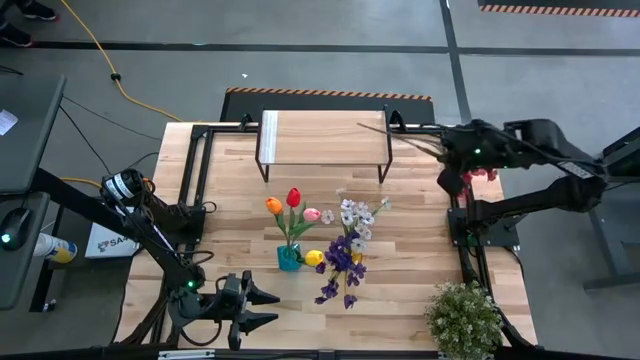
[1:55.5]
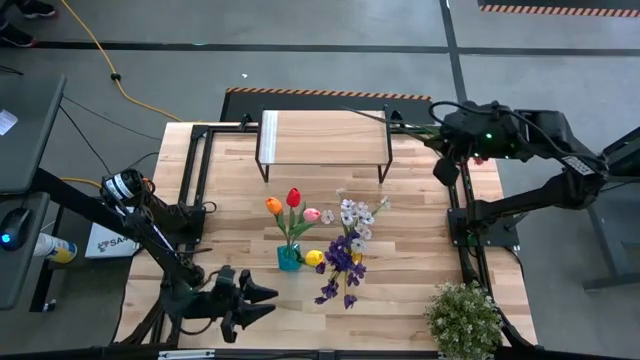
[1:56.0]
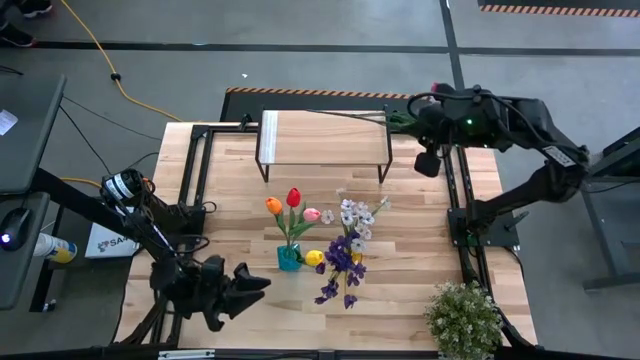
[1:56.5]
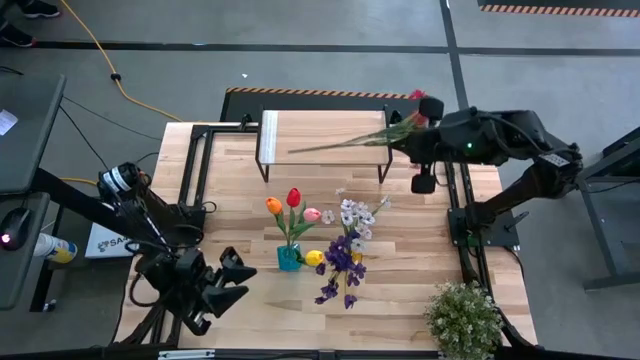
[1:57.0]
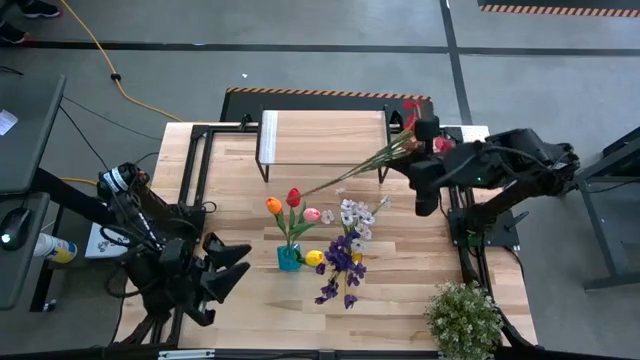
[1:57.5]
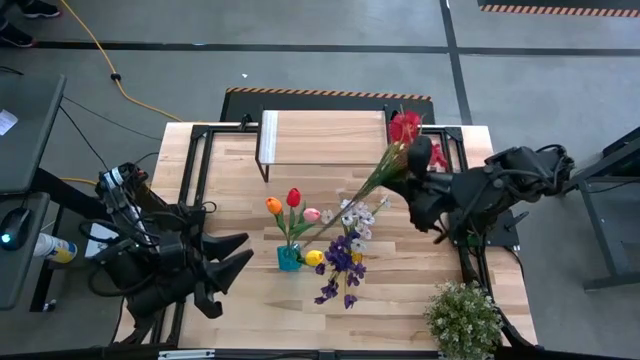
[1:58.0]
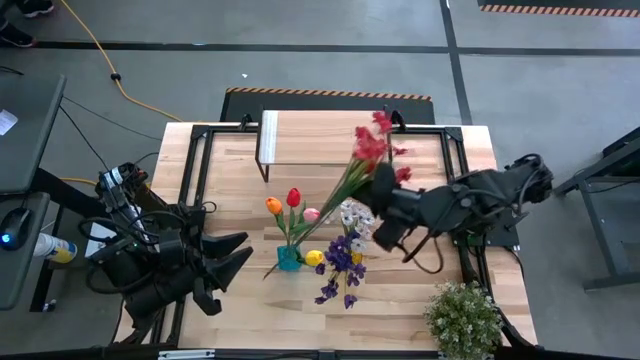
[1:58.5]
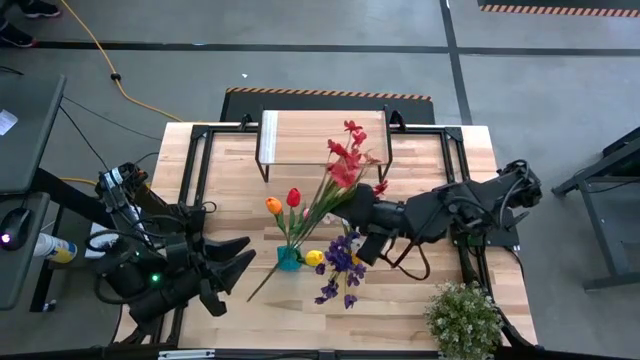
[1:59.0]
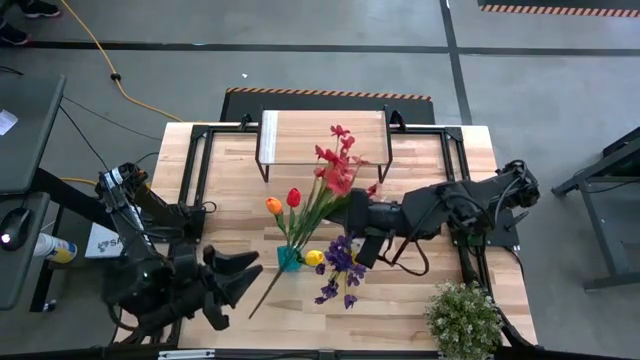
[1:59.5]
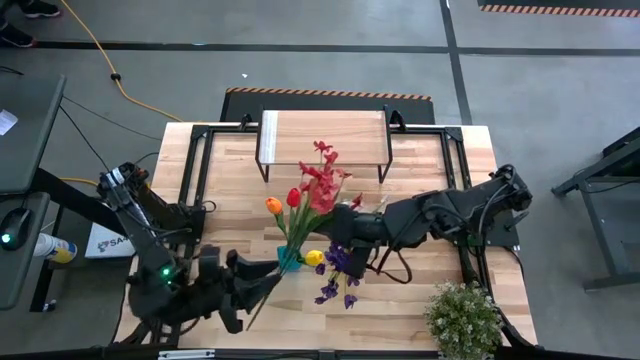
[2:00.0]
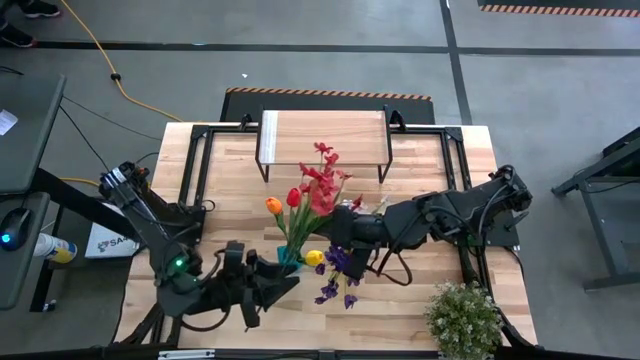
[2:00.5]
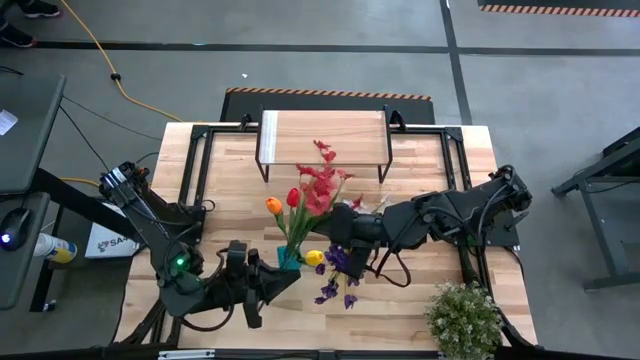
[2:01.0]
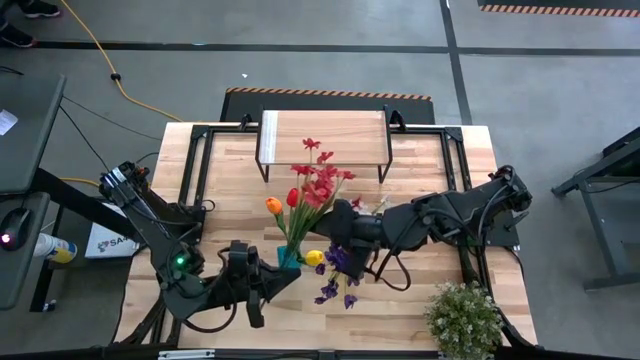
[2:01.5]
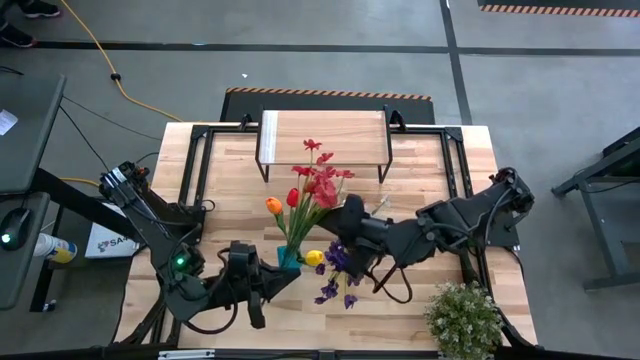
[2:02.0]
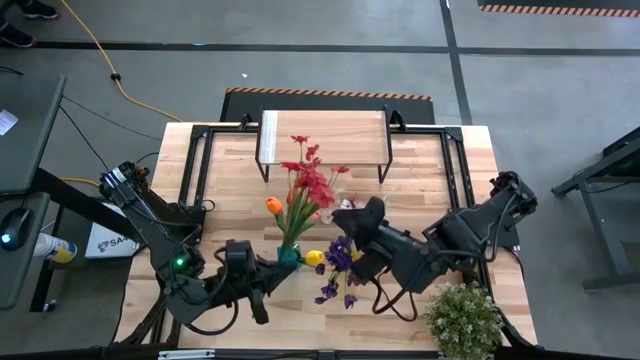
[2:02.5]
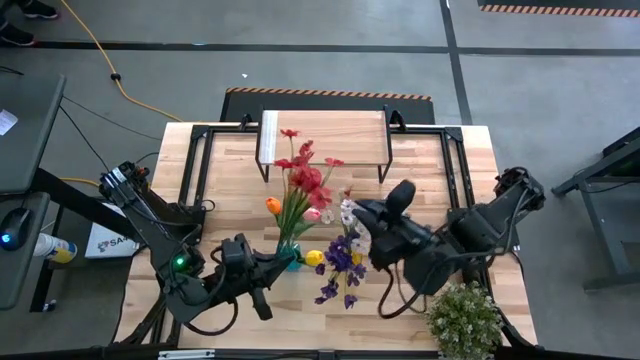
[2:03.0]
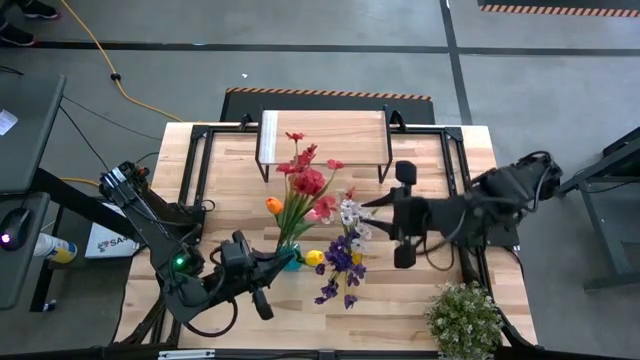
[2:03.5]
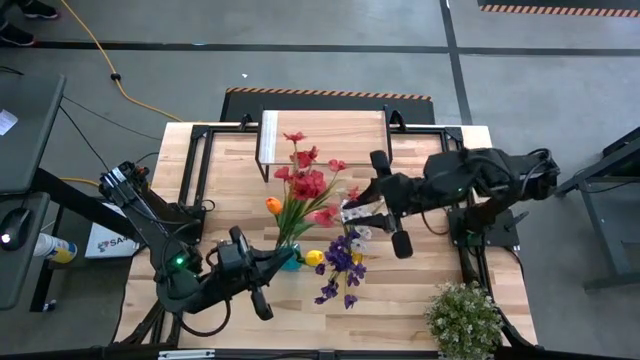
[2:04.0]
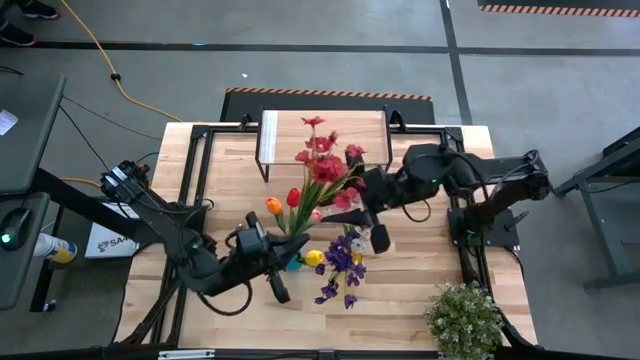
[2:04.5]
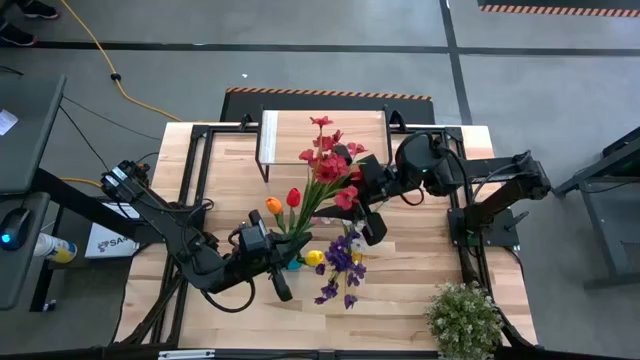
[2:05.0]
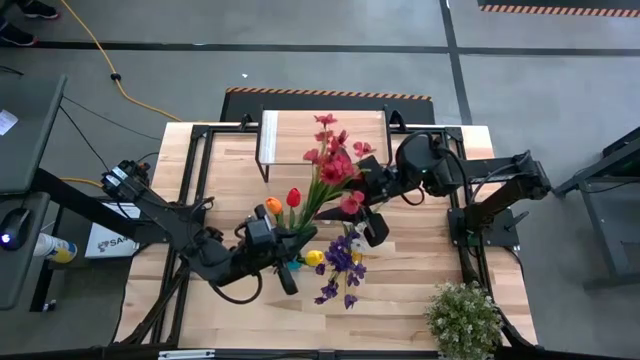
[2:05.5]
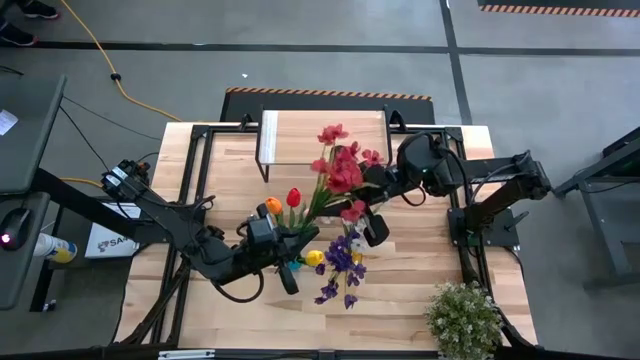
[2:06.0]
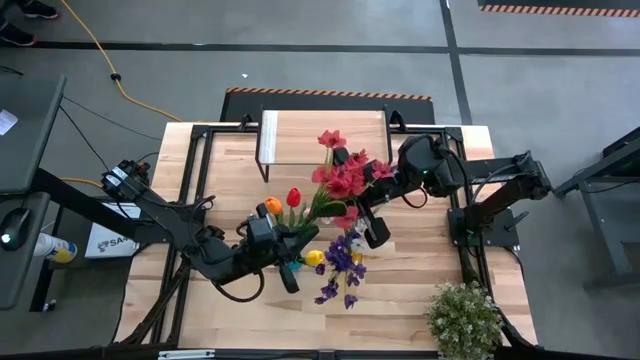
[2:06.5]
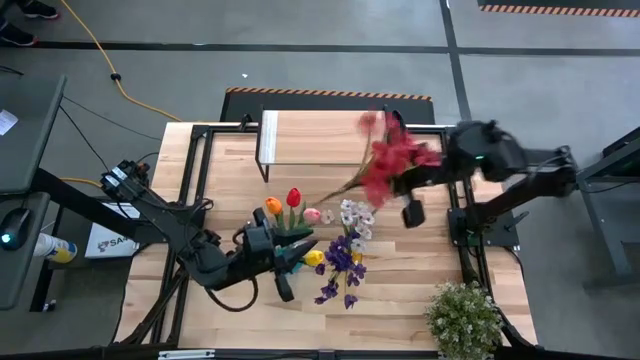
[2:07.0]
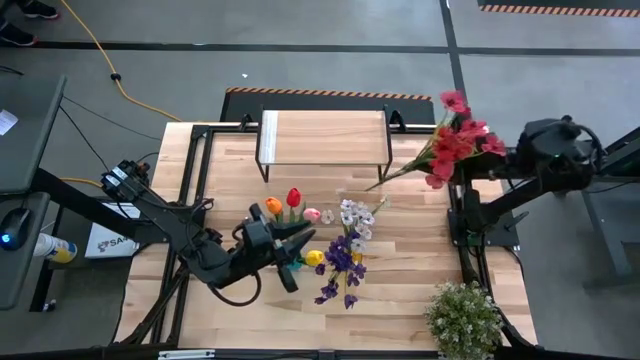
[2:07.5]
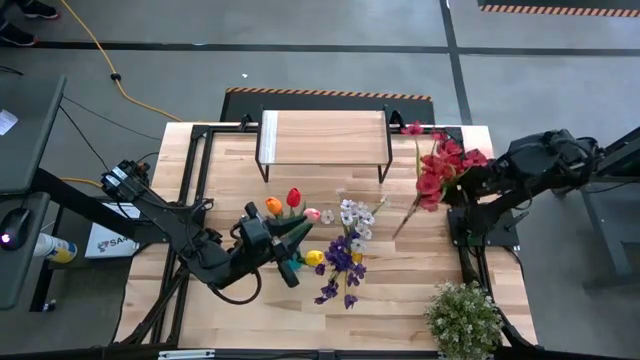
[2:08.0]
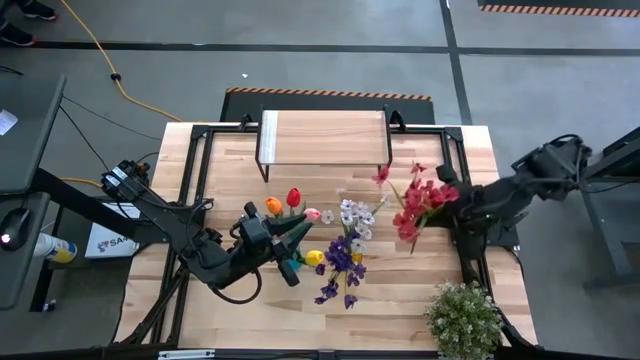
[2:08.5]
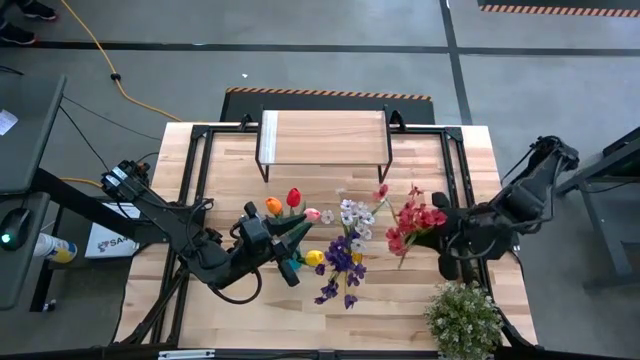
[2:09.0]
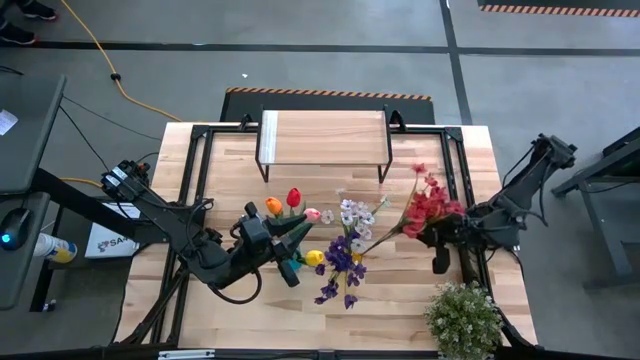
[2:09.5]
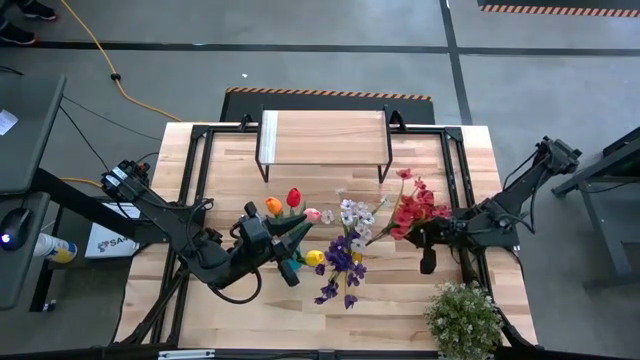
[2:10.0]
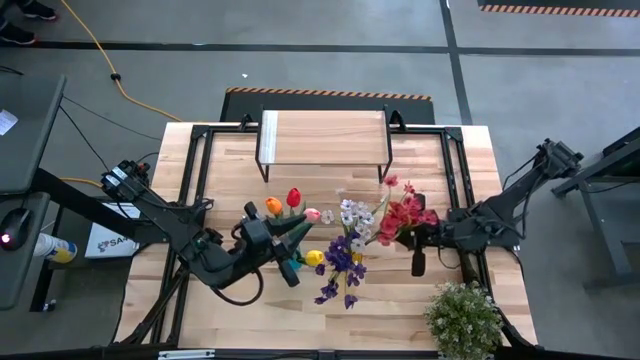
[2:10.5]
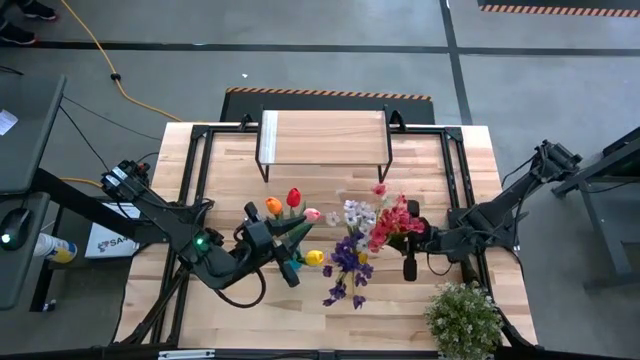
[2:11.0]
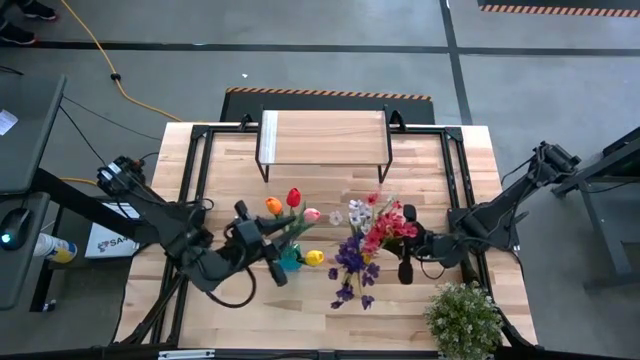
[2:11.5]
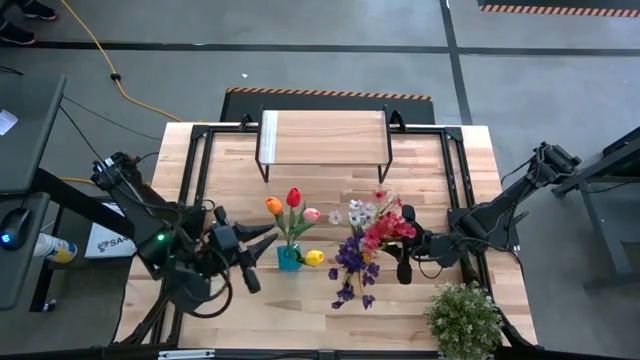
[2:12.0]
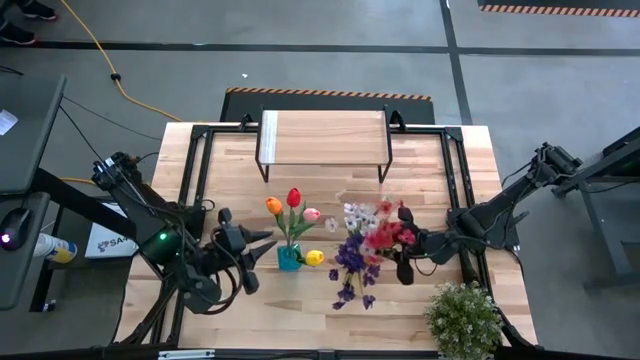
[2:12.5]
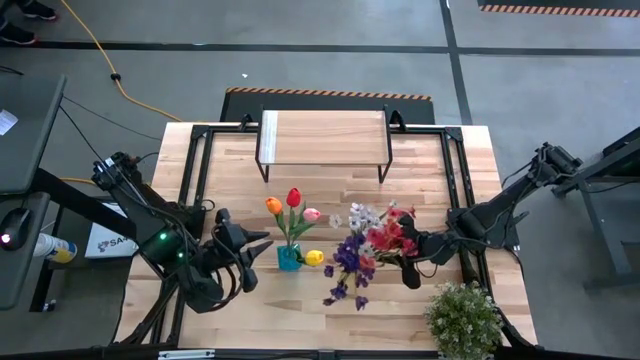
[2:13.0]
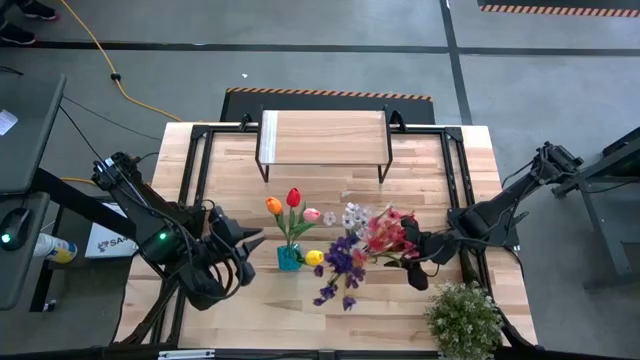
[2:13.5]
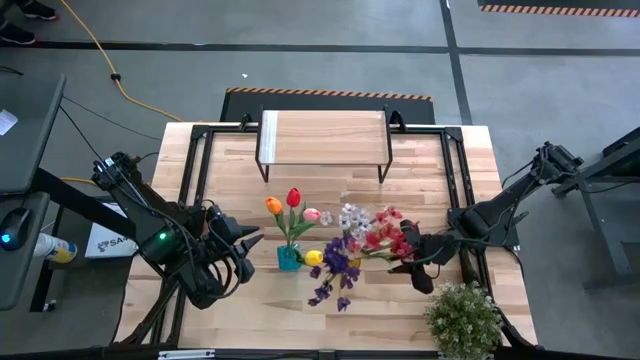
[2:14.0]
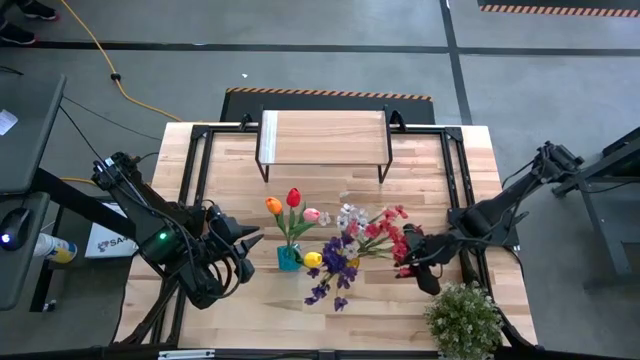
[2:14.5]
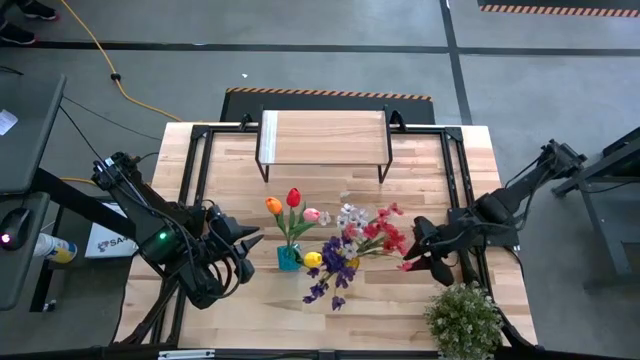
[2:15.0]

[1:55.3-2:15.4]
Task: Pick and place flowers into a vace then onto a shelf
Put the red flowers into the yellow vase
